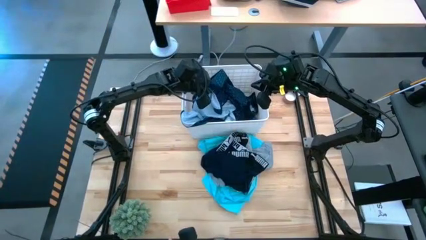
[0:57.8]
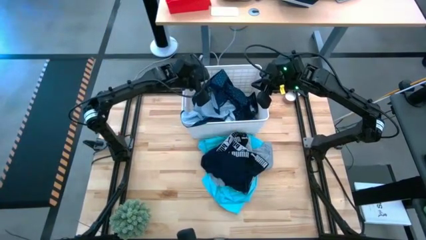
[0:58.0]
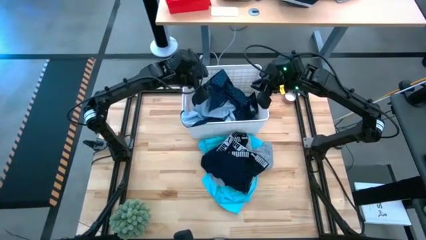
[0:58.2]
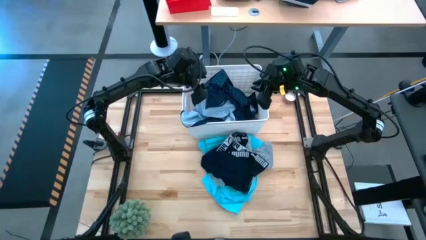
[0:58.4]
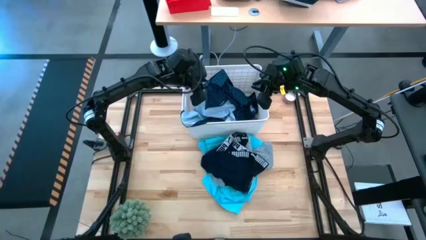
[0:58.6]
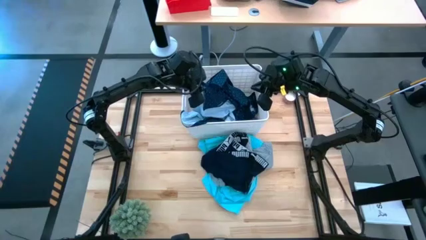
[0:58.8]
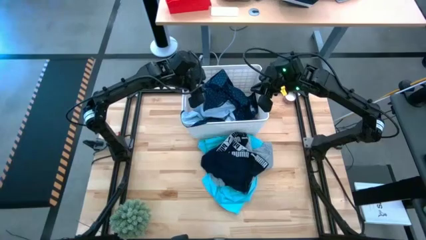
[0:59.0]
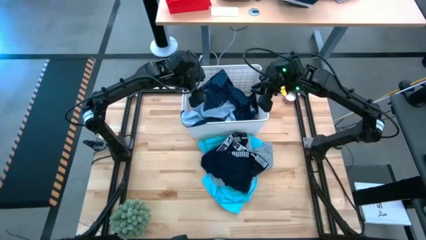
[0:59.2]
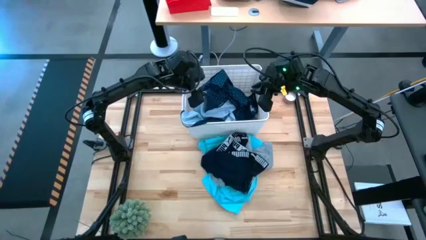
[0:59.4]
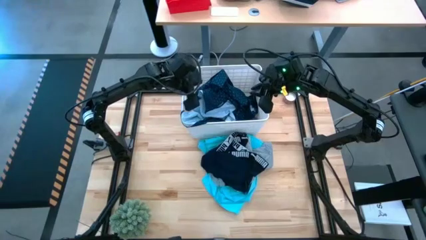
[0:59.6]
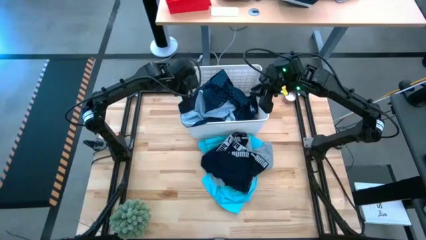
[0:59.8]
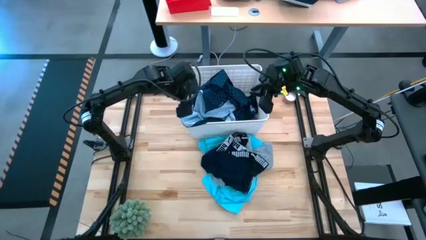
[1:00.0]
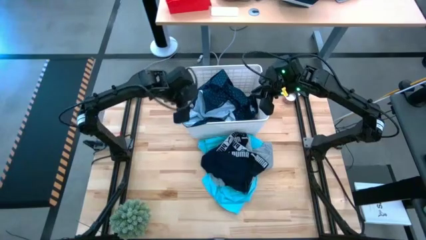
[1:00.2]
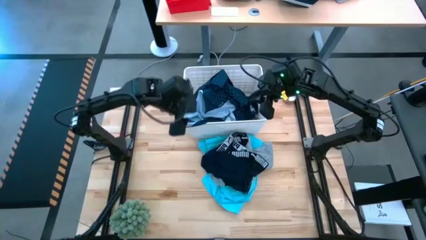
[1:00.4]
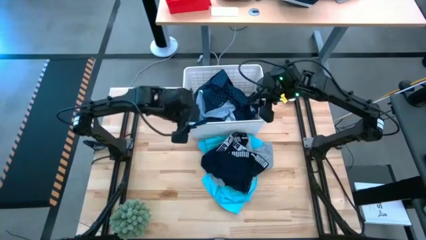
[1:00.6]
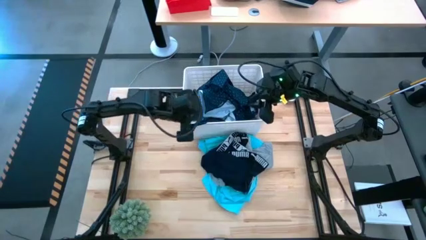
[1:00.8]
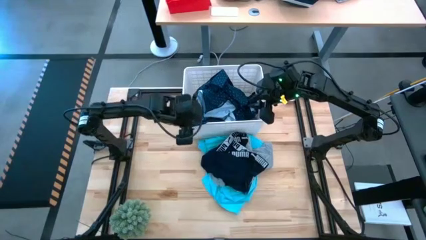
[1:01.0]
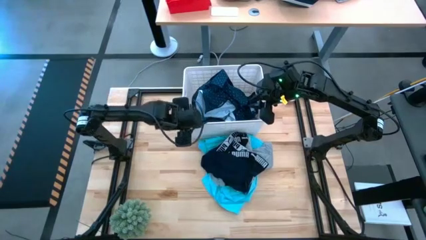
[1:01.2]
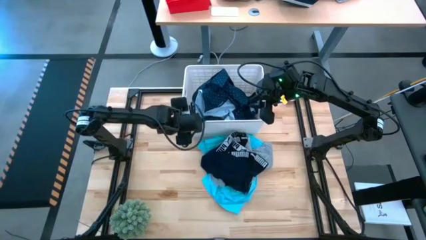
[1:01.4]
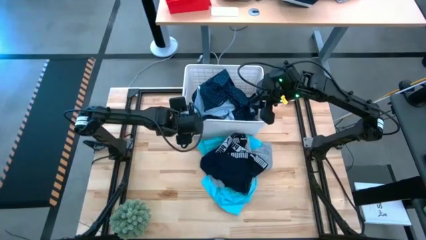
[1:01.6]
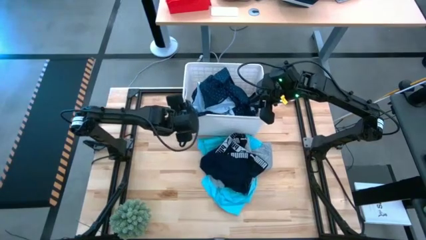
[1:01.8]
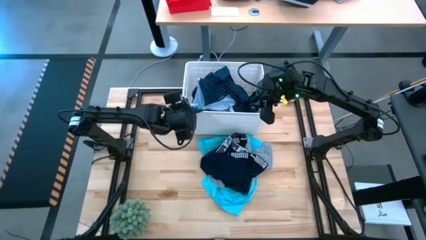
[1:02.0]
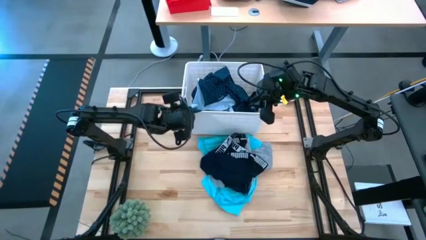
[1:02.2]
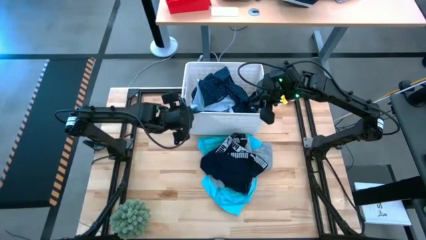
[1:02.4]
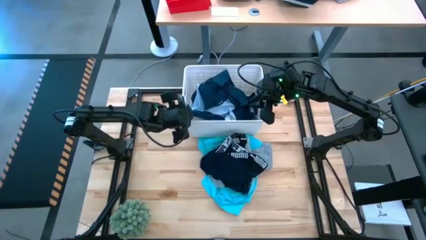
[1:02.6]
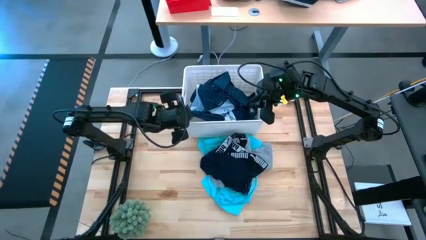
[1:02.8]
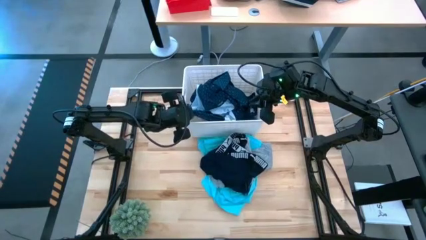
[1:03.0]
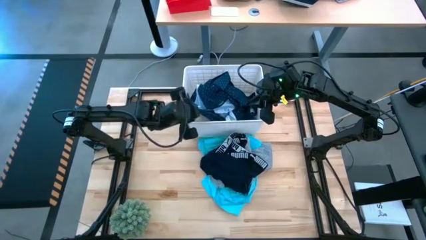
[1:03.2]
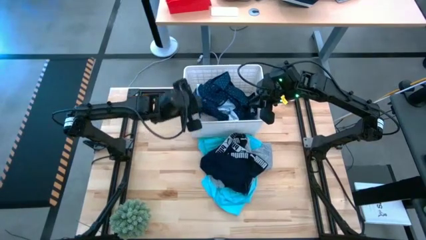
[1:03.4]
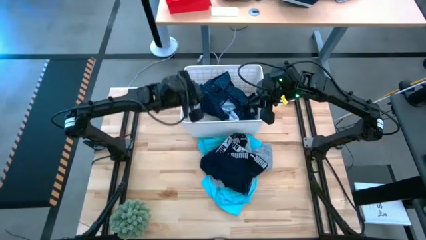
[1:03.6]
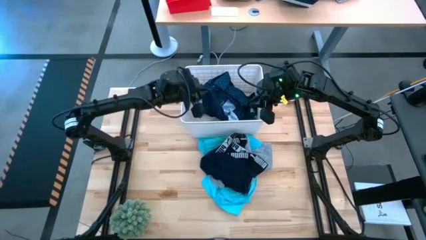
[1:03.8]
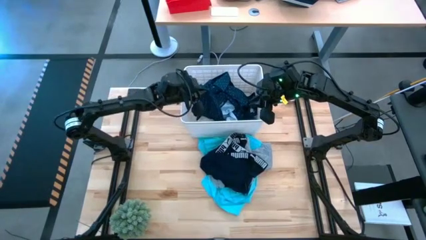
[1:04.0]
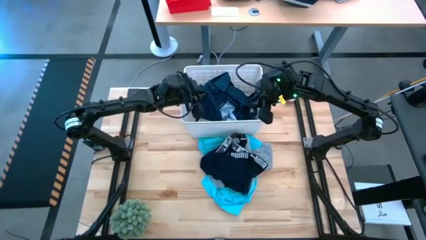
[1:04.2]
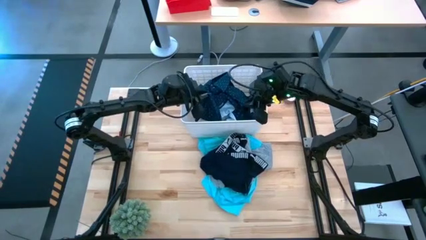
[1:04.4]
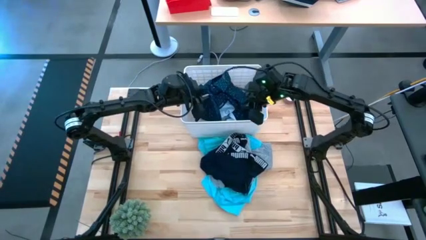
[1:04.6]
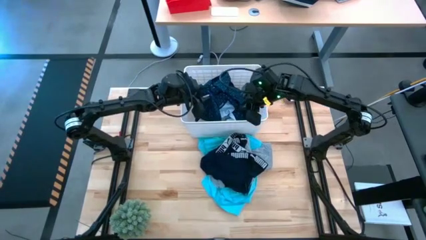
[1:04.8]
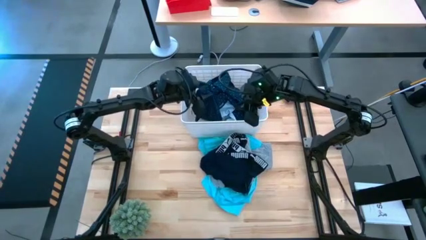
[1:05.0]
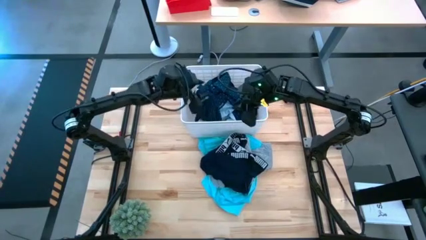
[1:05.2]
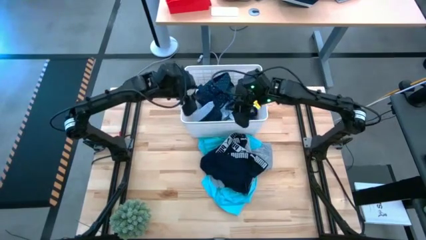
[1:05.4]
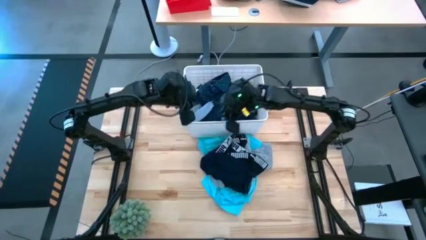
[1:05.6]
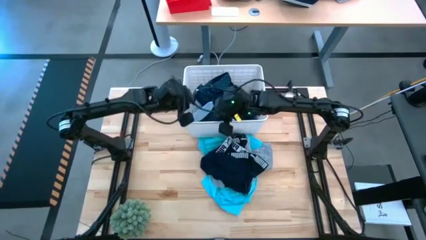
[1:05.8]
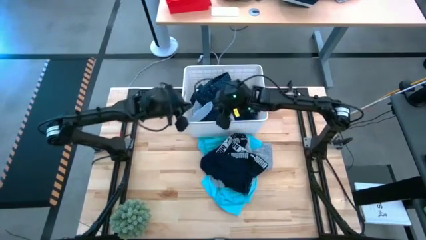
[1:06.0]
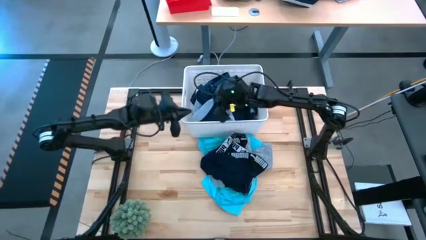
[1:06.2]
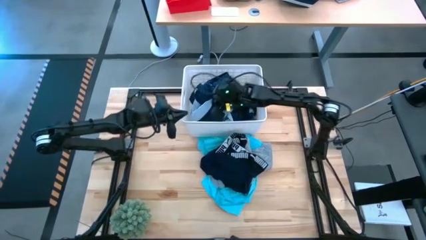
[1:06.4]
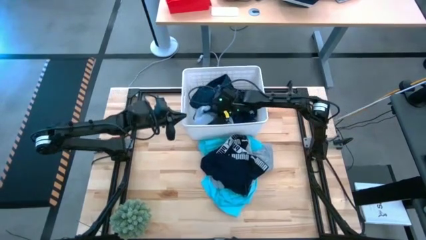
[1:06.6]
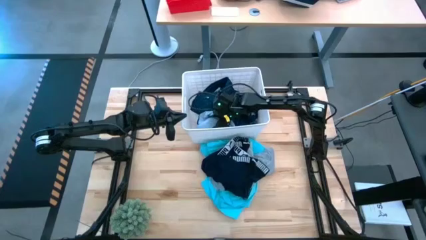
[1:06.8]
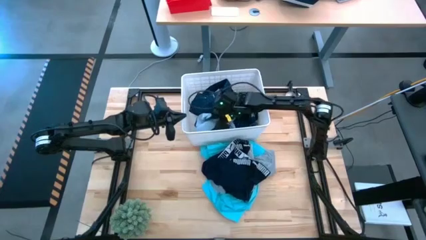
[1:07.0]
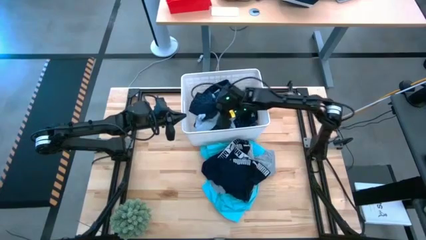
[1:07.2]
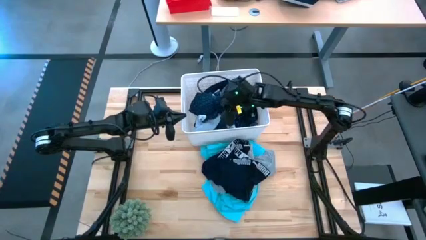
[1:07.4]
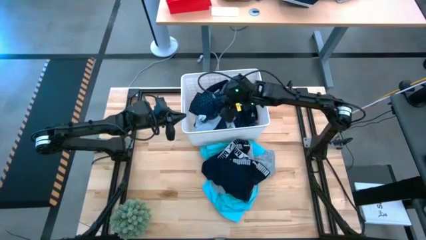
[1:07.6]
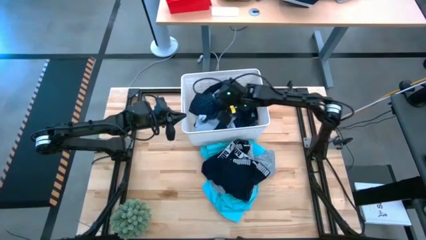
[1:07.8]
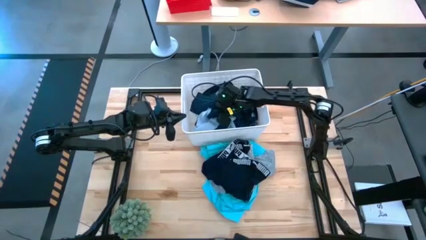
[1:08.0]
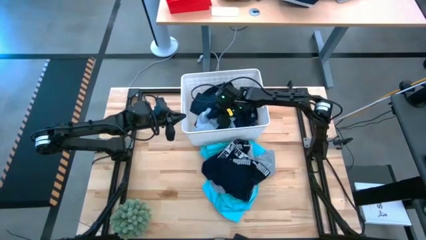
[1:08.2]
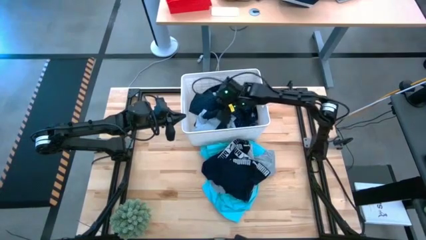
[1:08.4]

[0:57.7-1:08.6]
Task: Sort clothes
Put the blue polo shirt into the white bin
